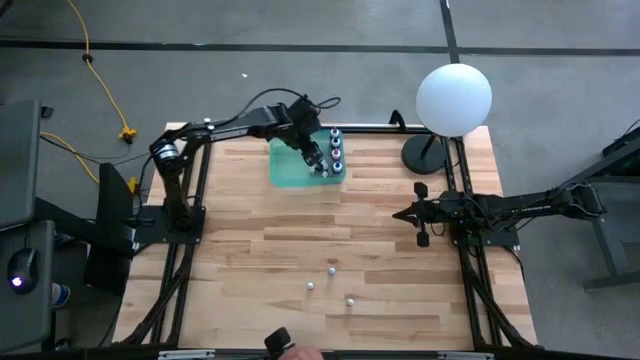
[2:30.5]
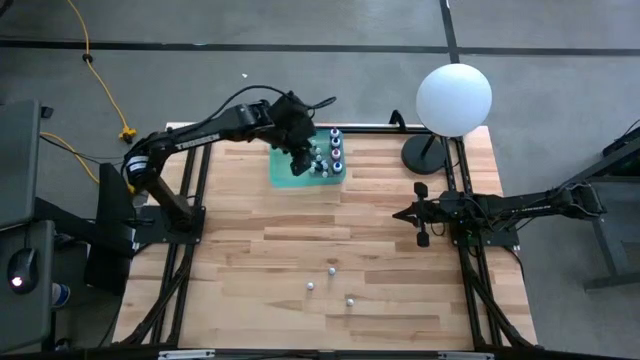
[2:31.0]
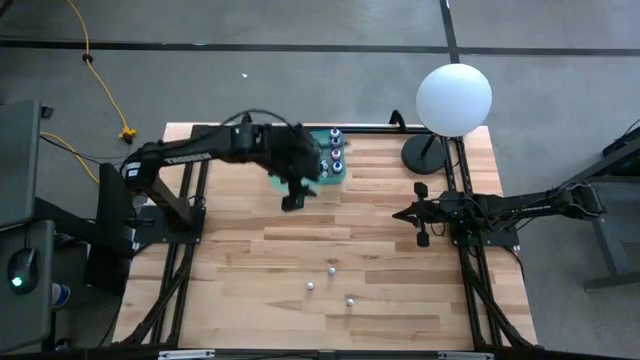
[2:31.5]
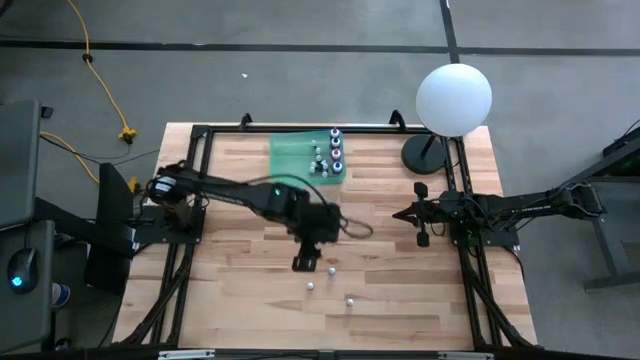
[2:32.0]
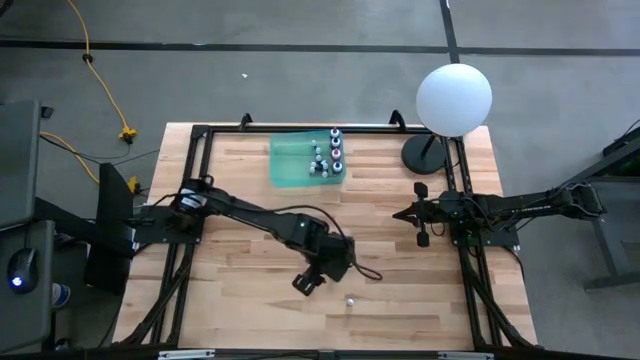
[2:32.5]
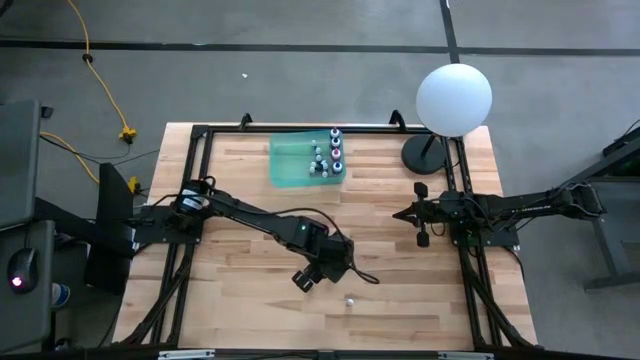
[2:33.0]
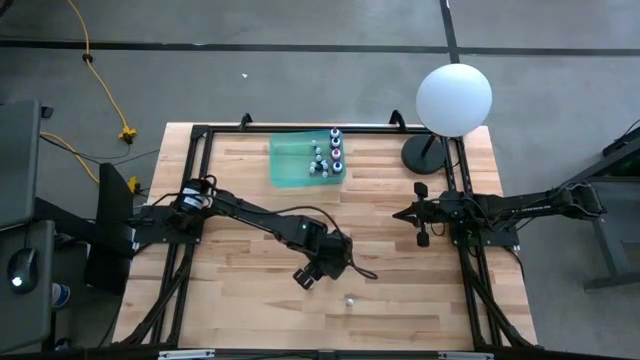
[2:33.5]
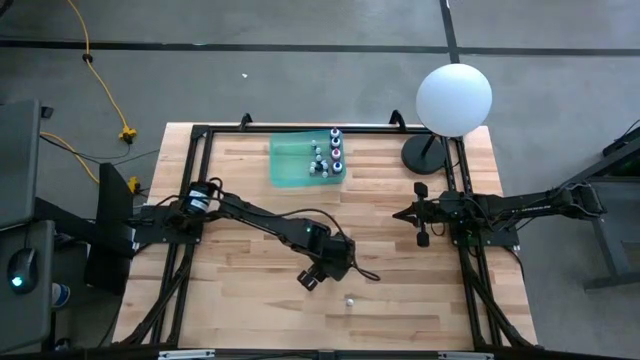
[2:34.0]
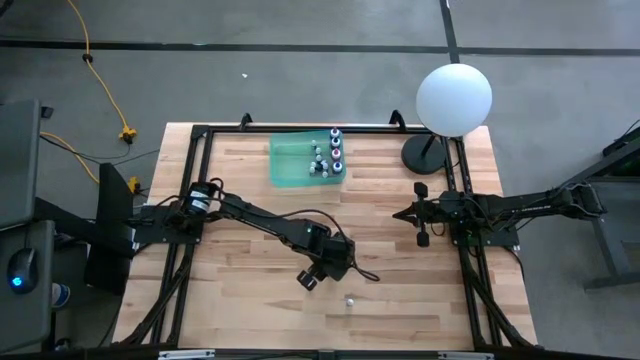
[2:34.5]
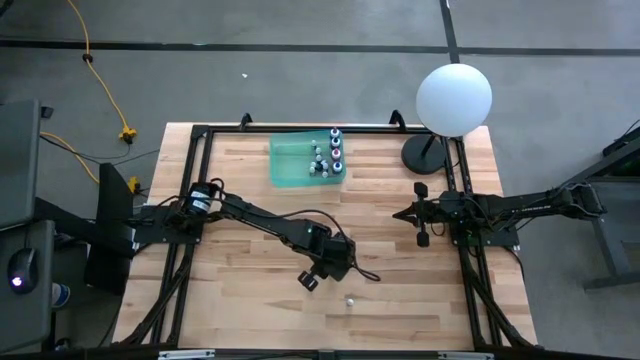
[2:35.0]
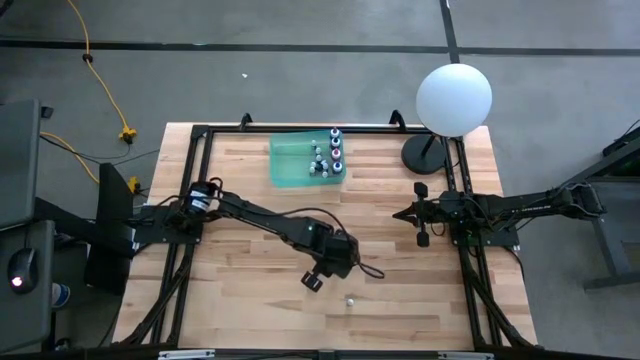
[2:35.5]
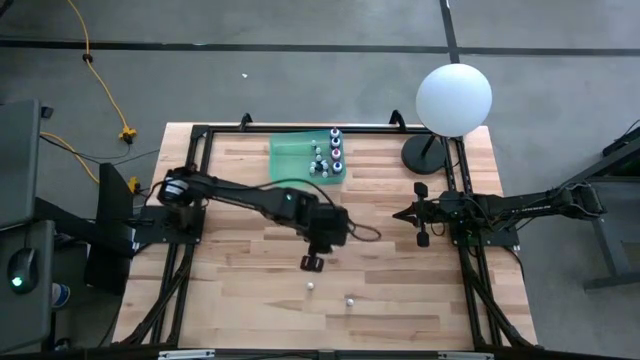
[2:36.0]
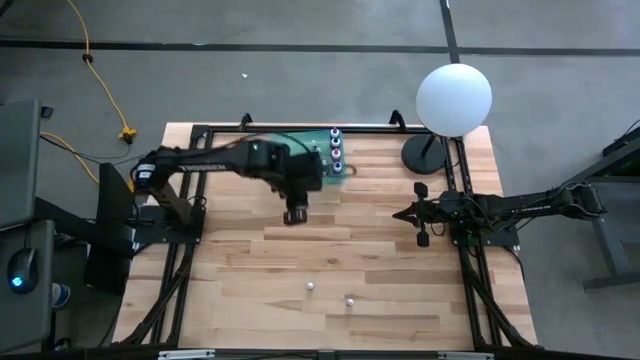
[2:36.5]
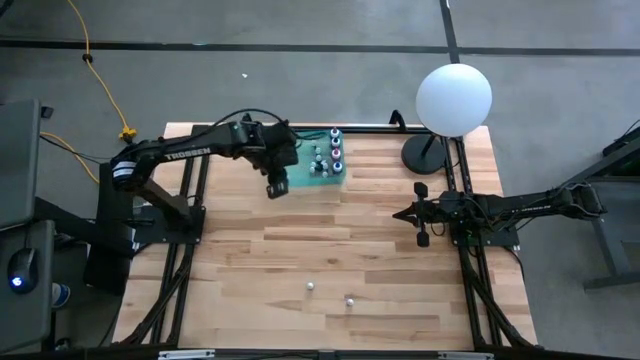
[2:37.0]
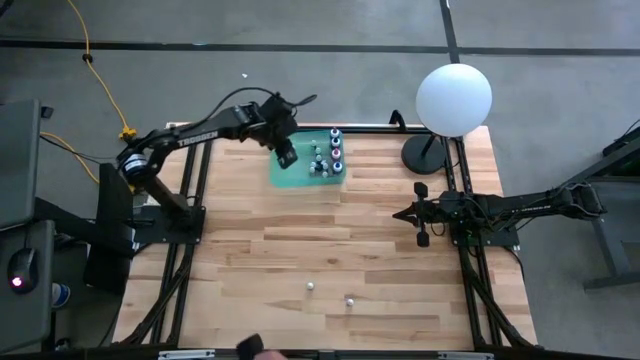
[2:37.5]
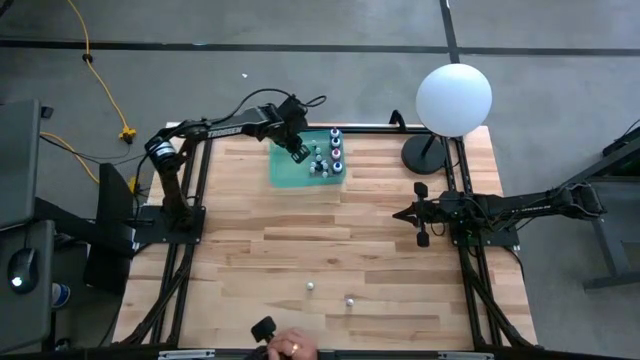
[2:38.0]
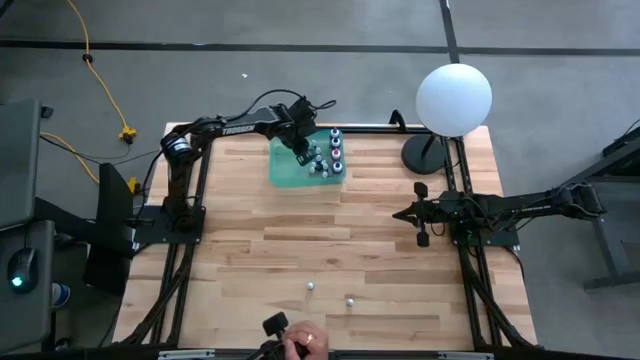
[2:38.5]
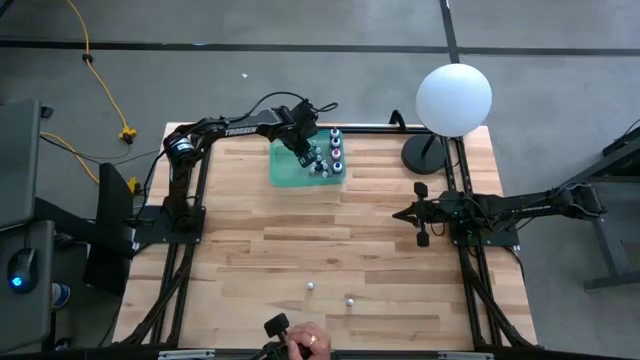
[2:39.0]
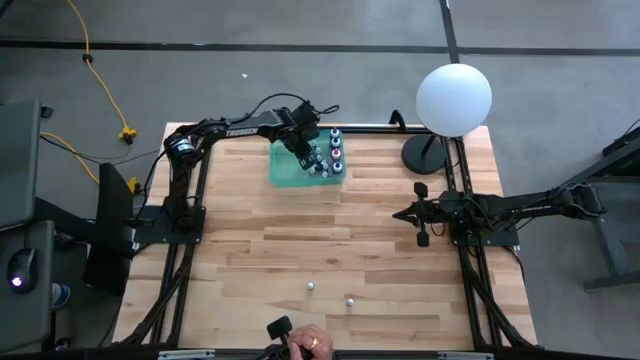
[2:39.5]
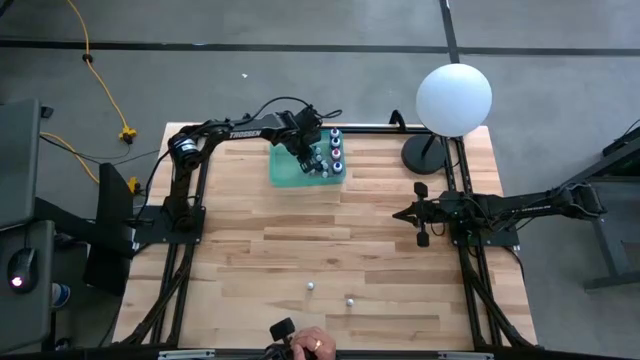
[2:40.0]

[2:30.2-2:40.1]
Task: Pick & Place food coloring
Put the small black food coloring bottle into the blue transparent bin

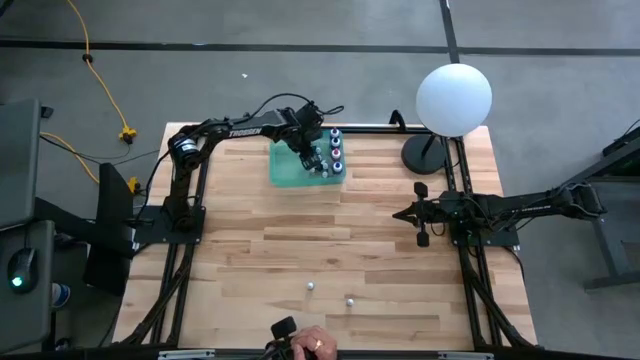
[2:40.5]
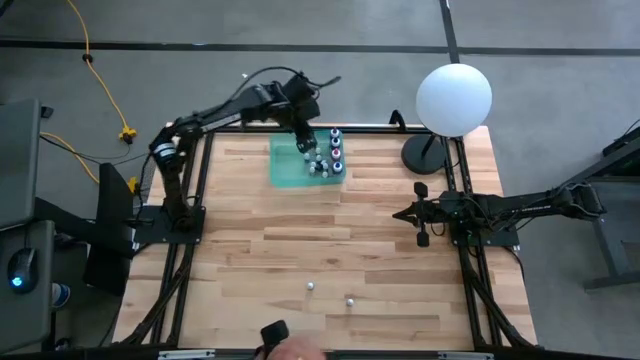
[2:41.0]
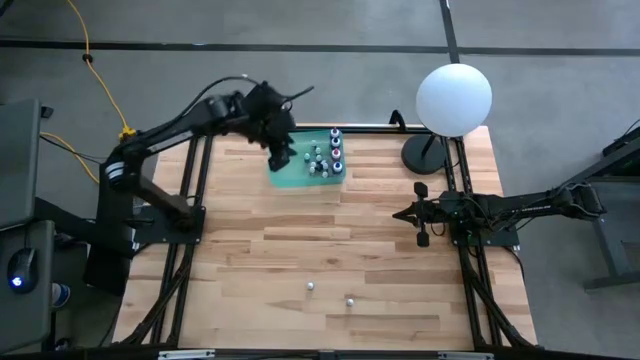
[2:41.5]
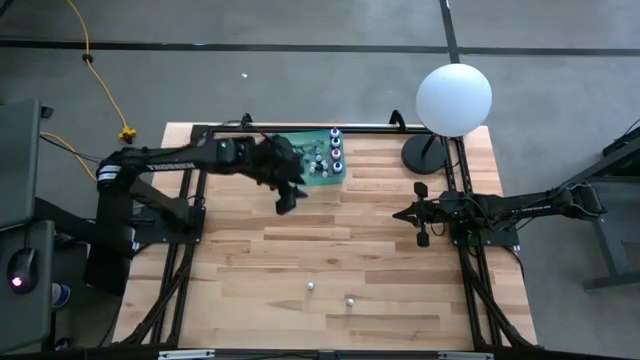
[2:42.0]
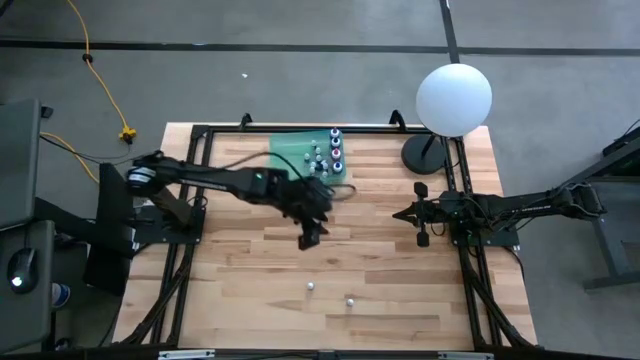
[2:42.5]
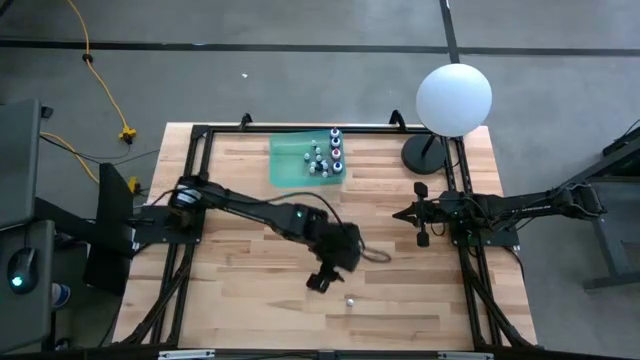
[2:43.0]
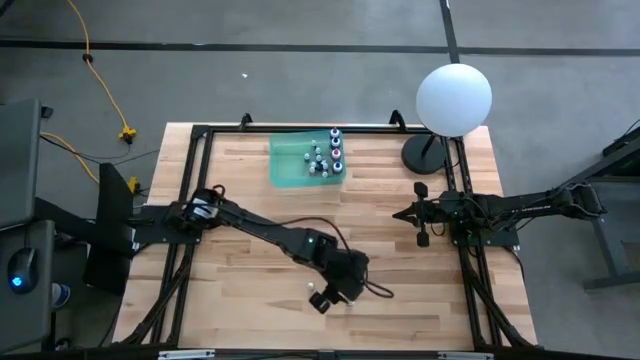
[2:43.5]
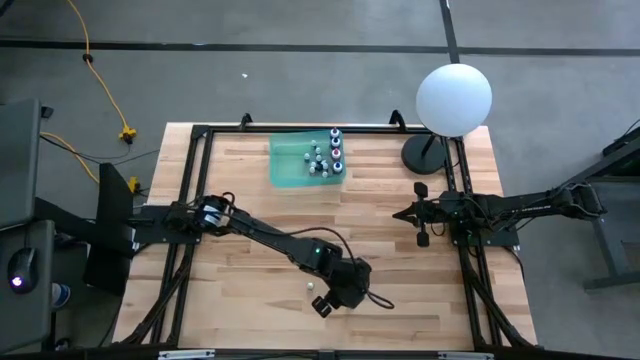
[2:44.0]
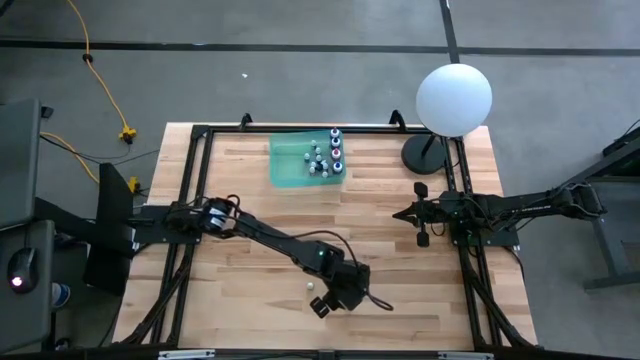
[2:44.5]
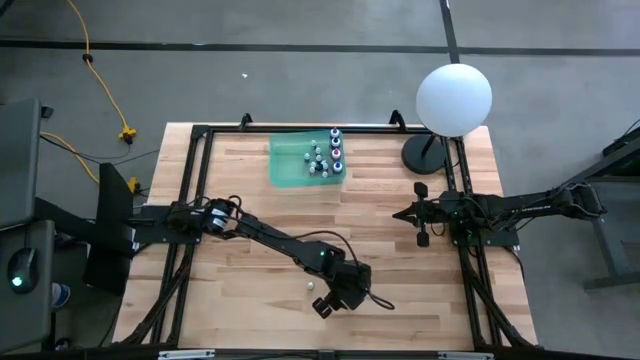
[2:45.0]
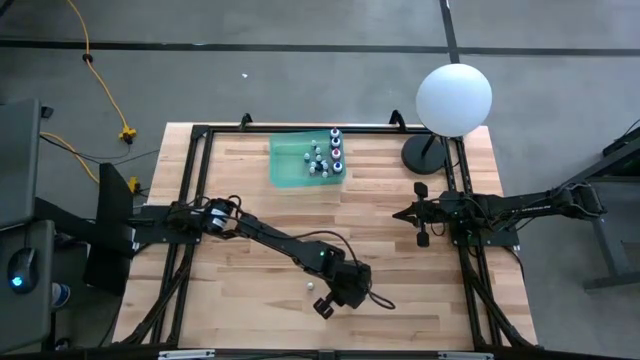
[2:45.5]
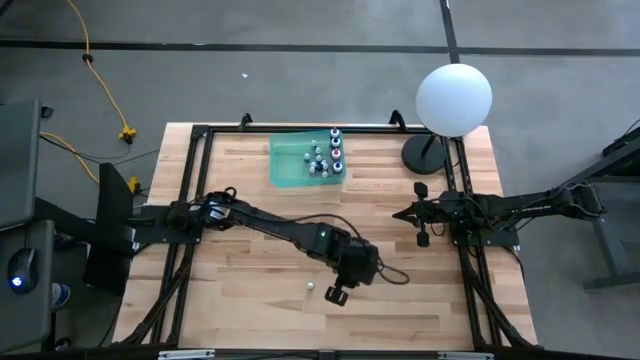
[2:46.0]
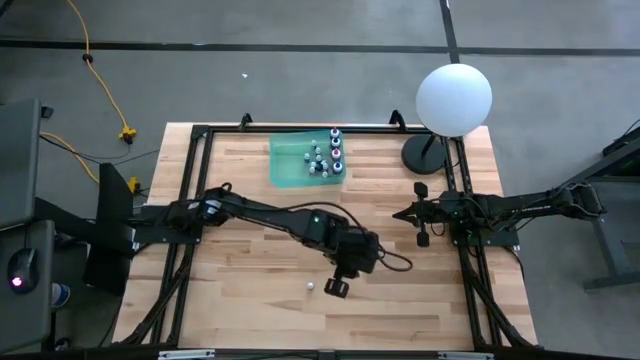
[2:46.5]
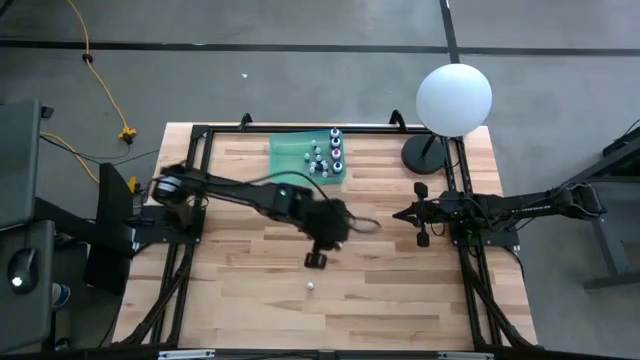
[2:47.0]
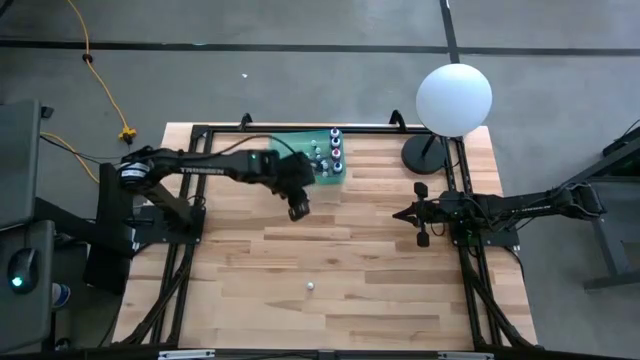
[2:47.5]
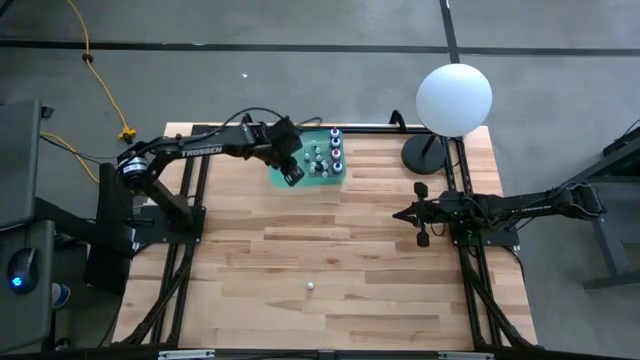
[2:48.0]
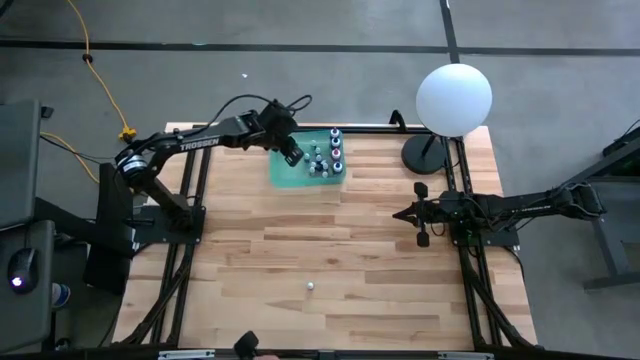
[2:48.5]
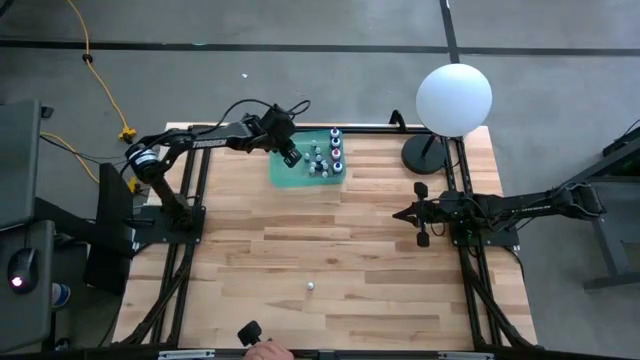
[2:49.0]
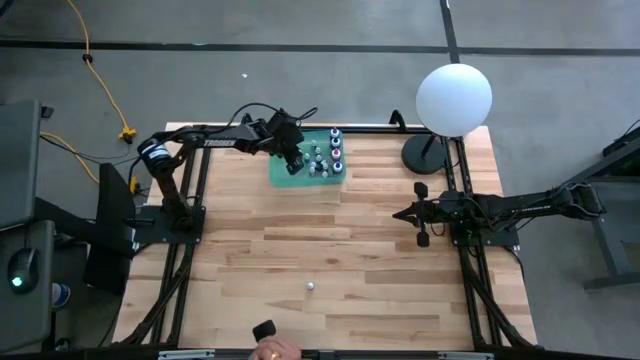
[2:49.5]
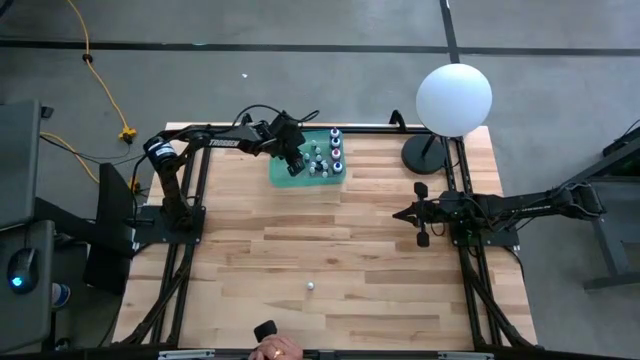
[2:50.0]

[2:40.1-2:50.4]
Put the small red food coloring bottle into the blue transparent bin
